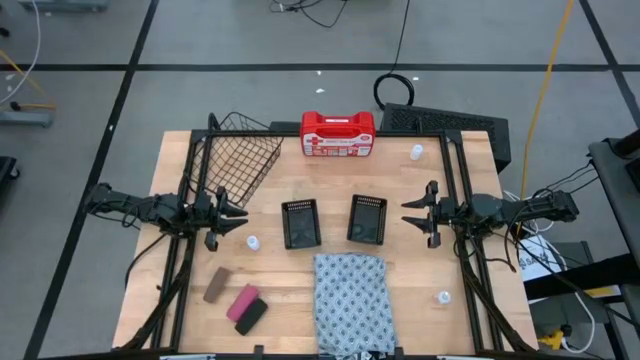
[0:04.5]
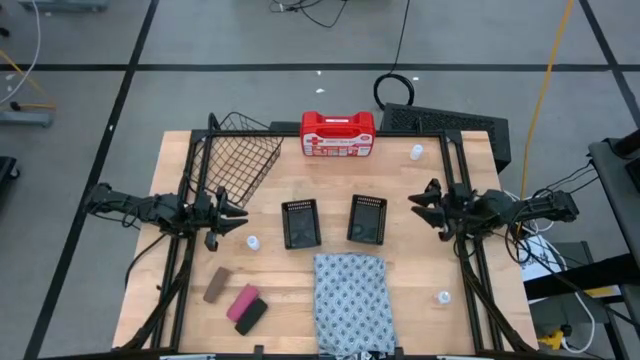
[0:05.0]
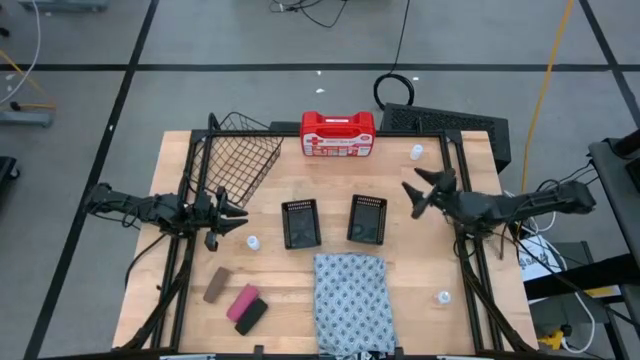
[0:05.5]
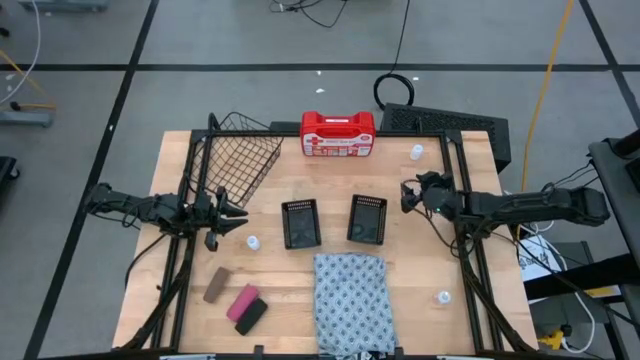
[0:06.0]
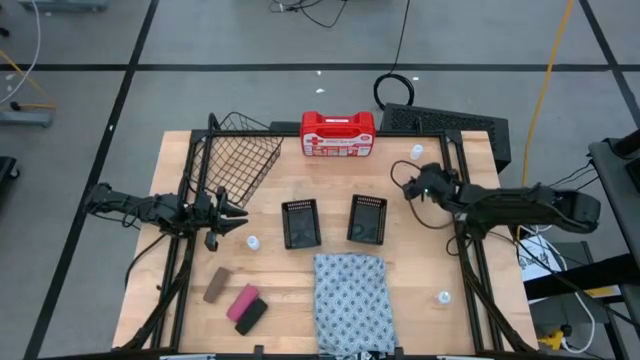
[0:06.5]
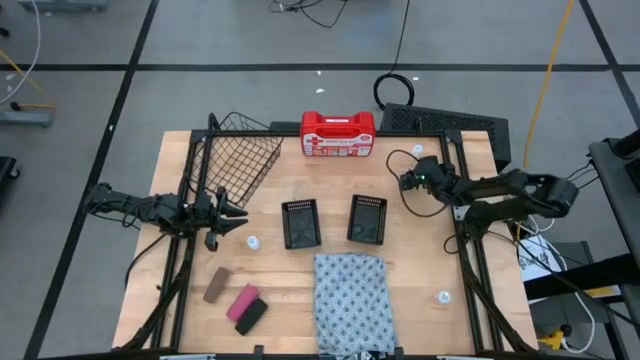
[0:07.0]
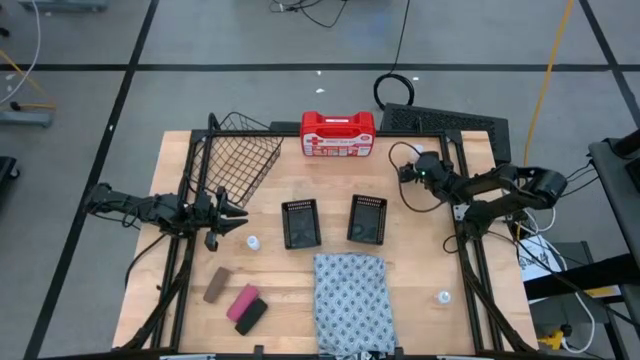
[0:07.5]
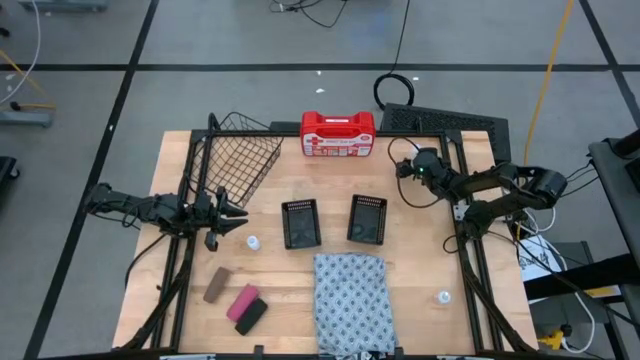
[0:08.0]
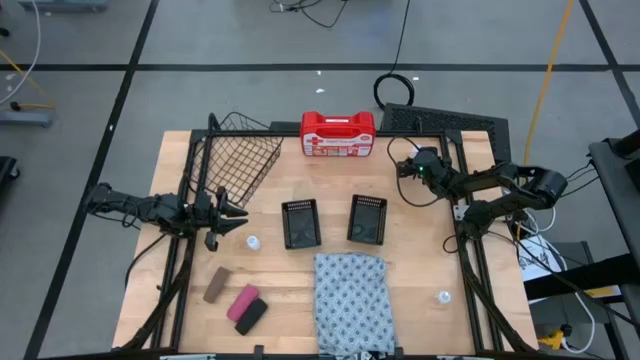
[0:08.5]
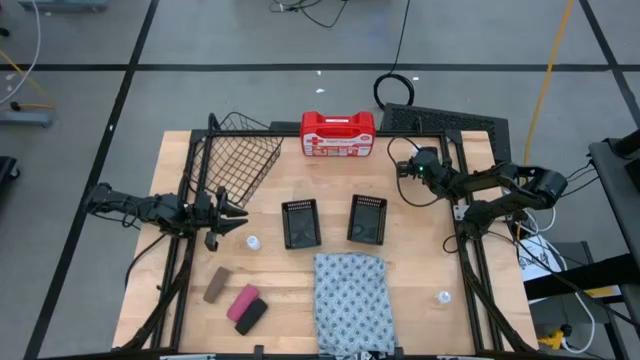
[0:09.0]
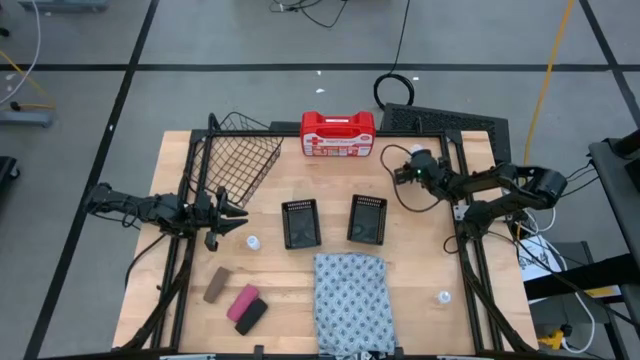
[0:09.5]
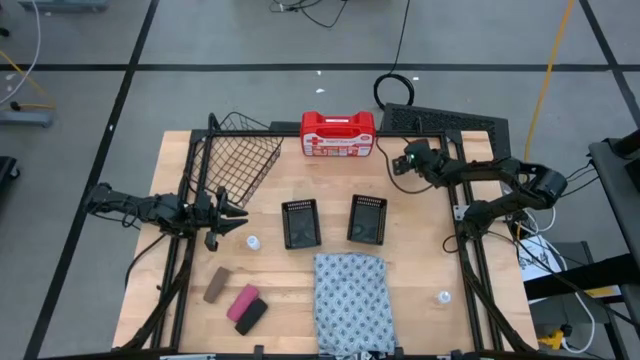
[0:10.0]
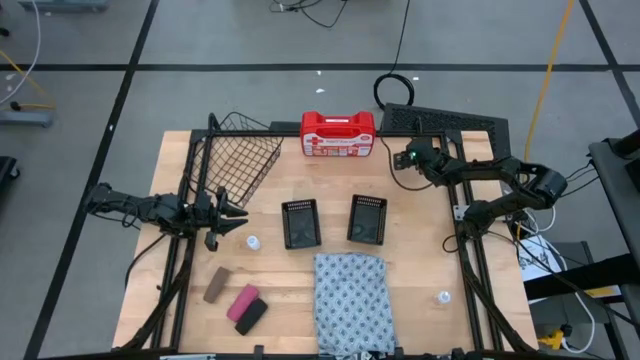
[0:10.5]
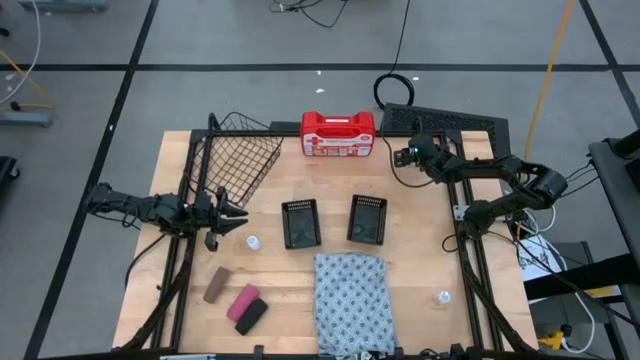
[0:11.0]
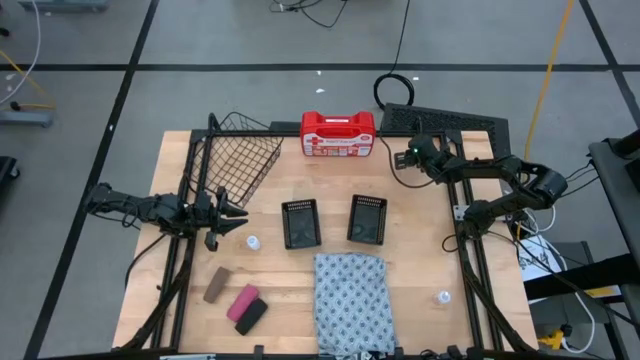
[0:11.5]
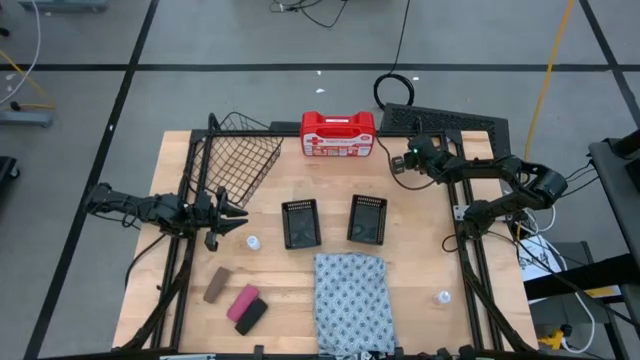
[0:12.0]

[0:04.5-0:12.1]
Task: Pick & Place Medicine items
Put the top white pill bottle into the right black basket

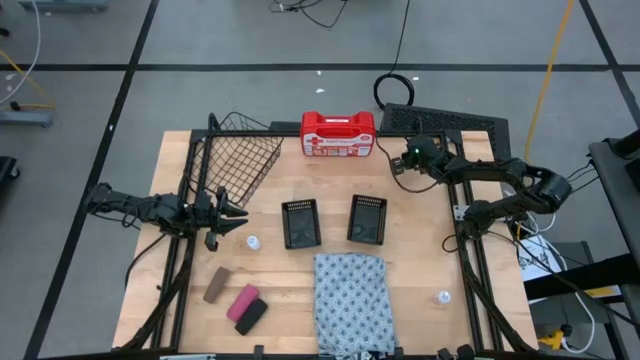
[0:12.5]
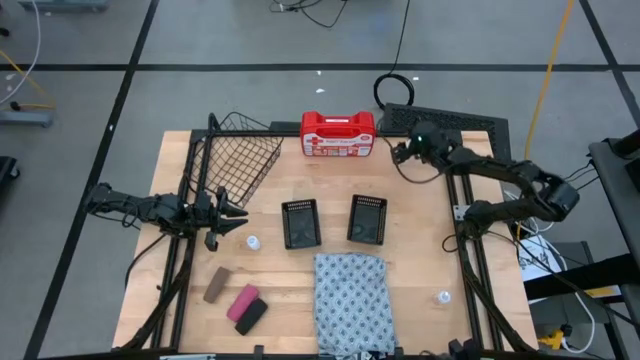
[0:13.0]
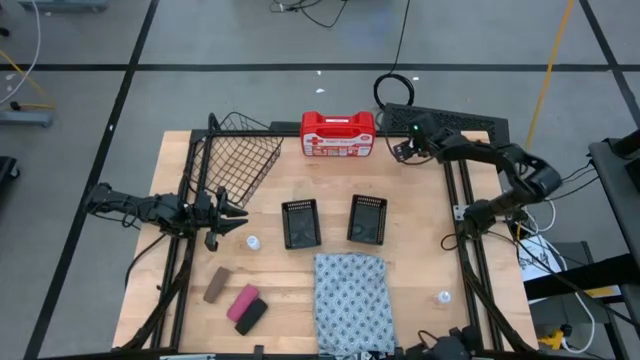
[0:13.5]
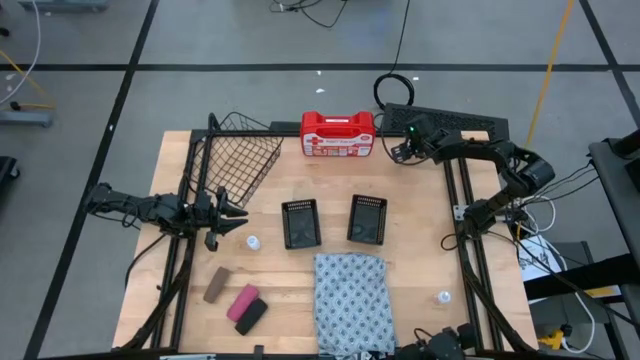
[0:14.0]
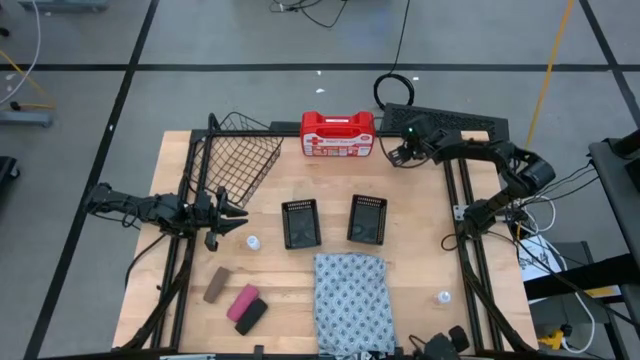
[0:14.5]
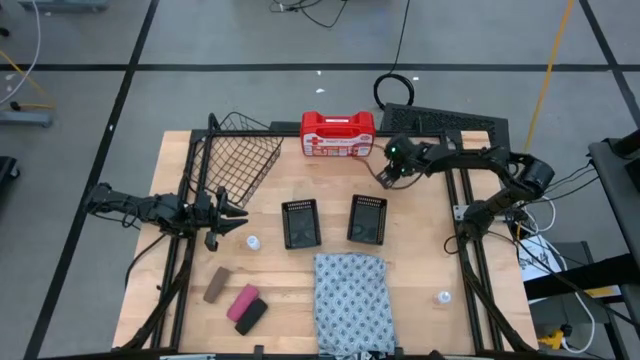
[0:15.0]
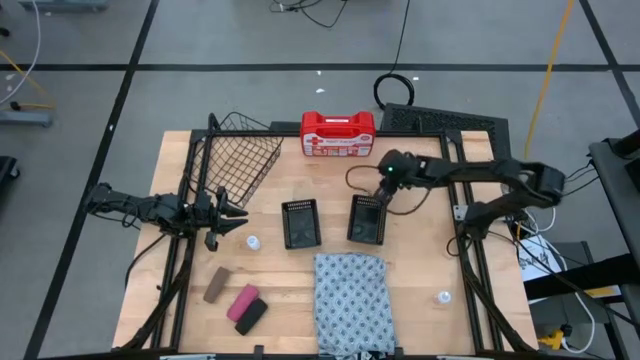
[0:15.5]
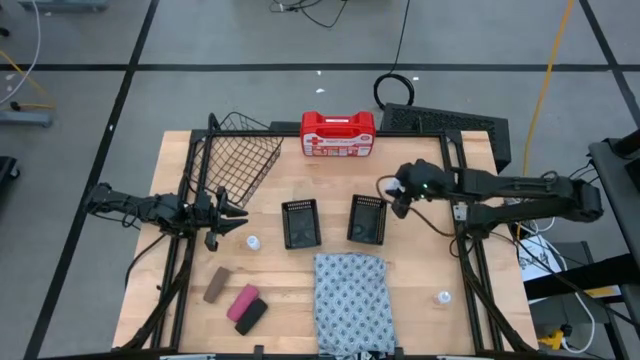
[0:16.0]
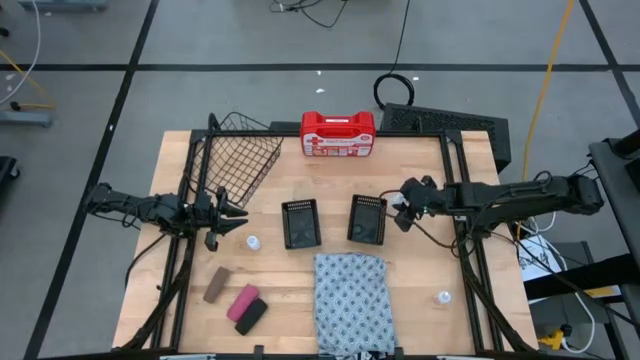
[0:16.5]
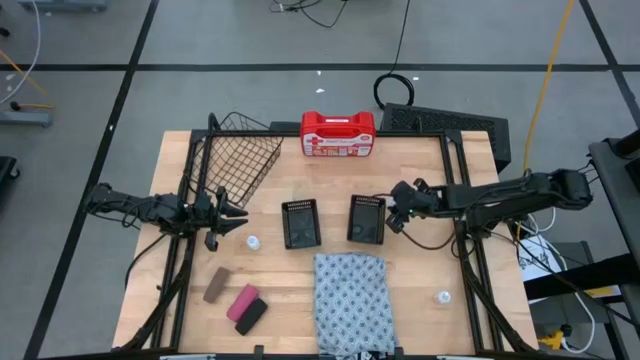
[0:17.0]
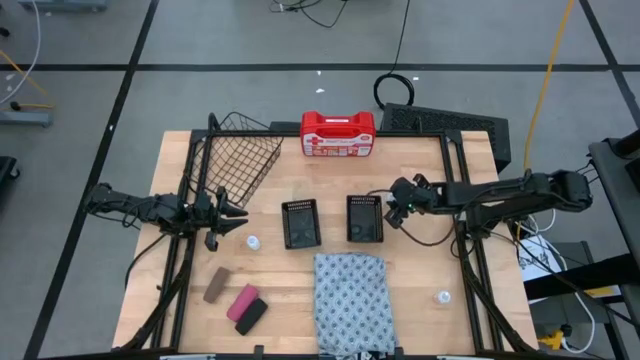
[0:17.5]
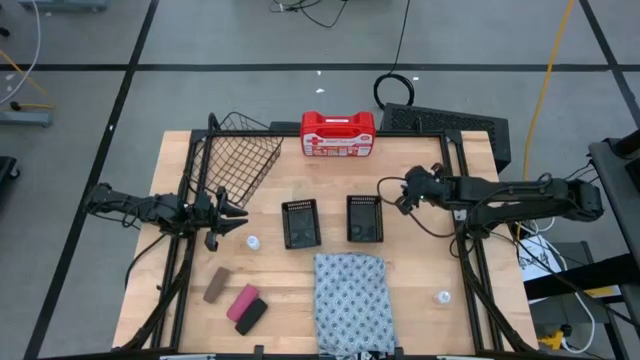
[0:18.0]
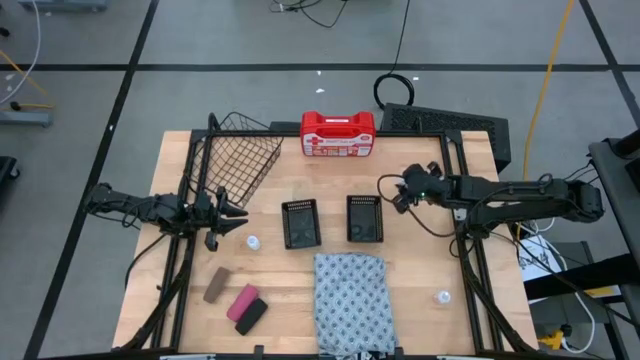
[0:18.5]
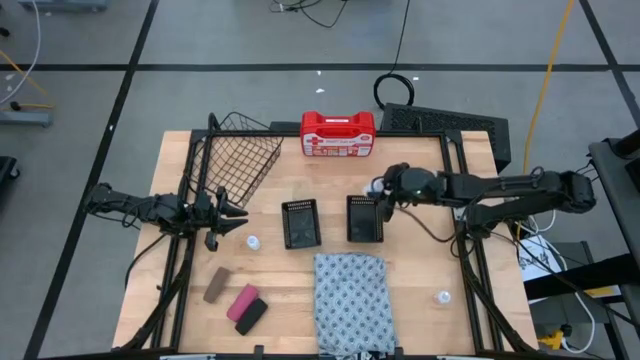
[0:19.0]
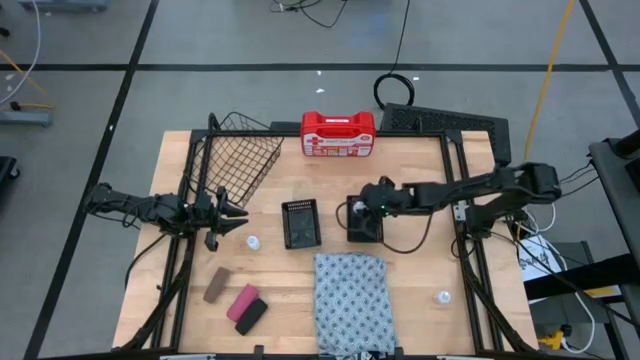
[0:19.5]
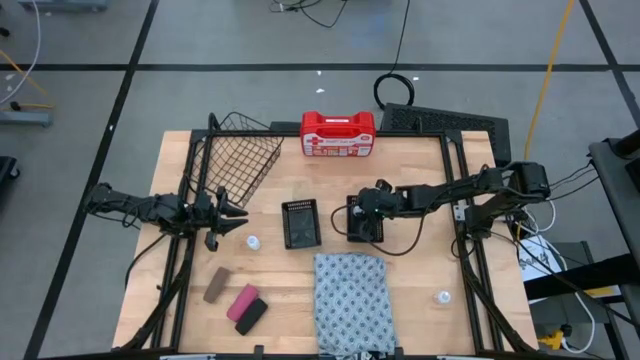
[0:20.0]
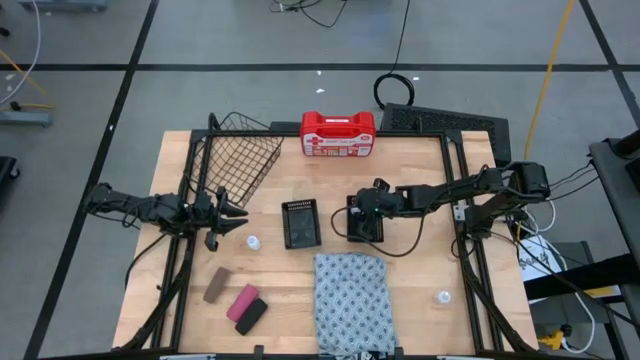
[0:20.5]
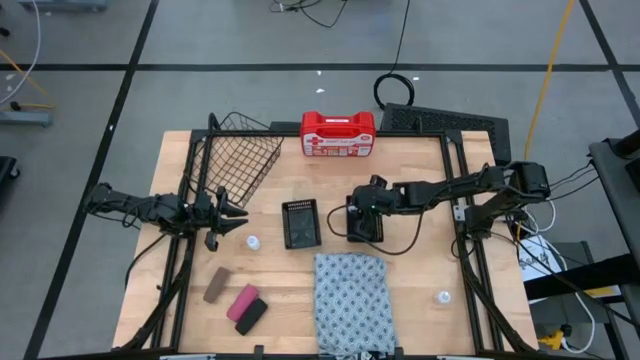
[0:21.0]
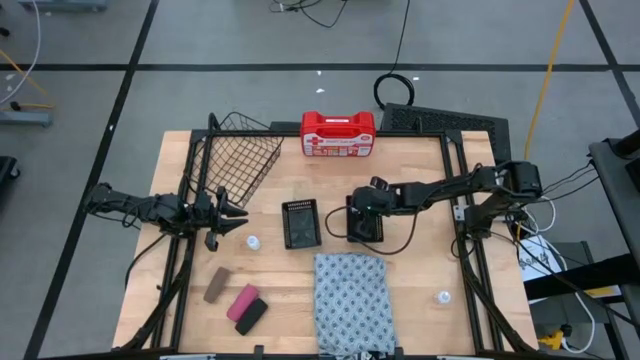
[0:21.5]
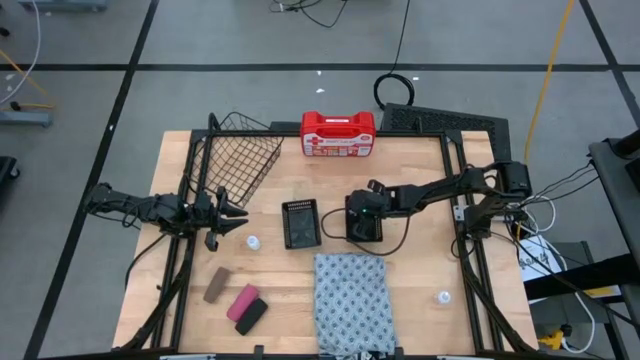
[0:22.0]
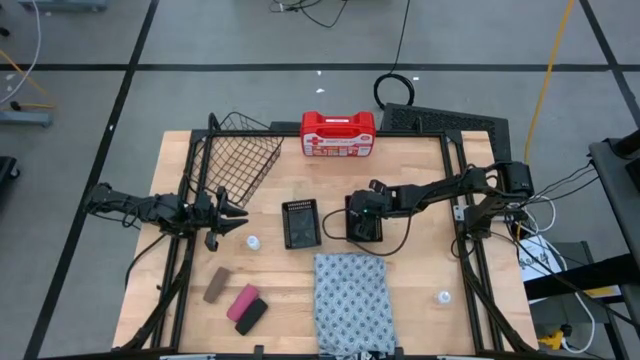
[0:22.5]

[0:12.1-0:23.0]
Put the top white pill bottle into the right black basket

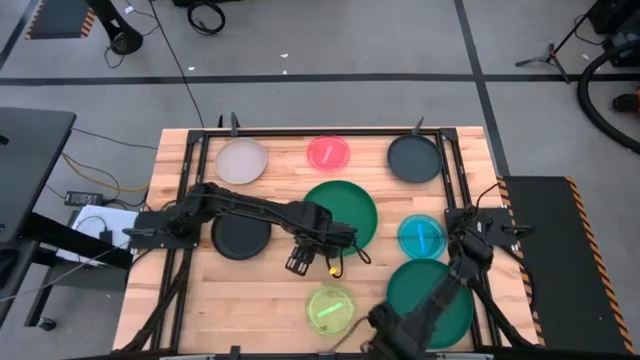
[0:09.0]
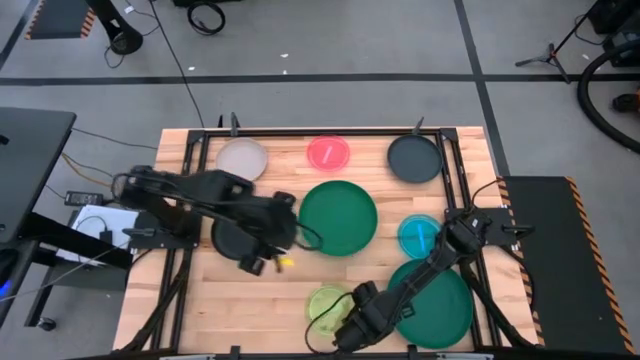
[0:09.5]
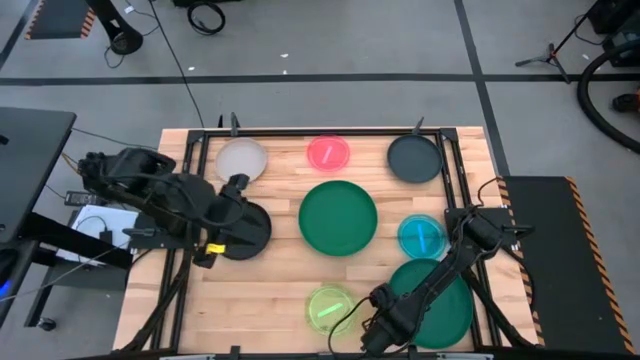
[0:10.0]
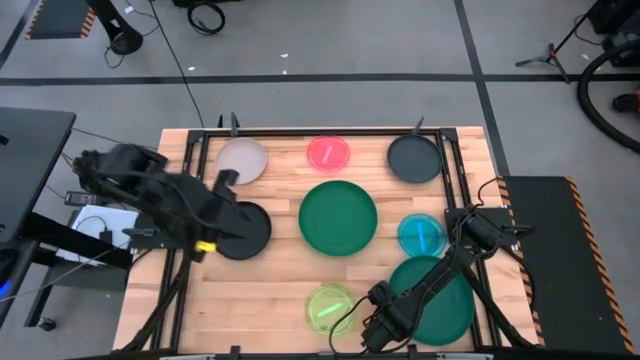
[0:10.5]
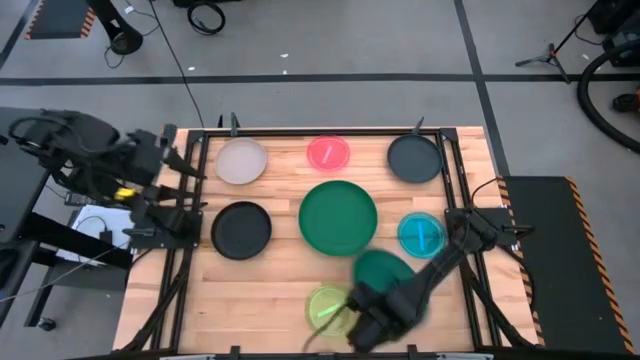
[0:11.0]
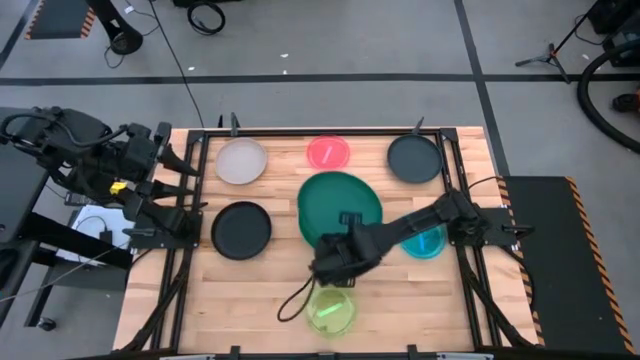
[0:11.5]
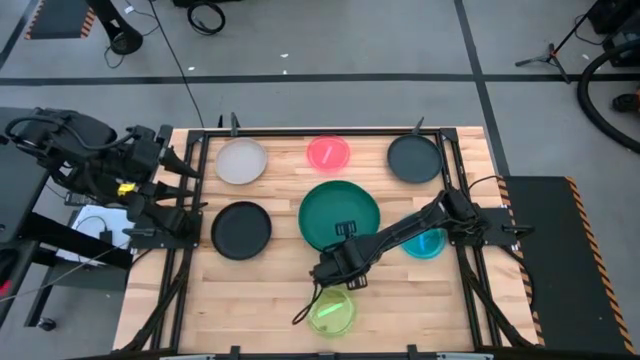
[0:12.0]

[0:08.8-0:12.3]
Task: Stack plastic plates
Stack the dark green plate on top of the dark green plate
